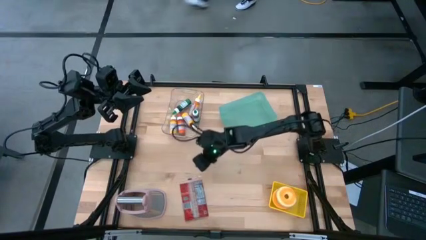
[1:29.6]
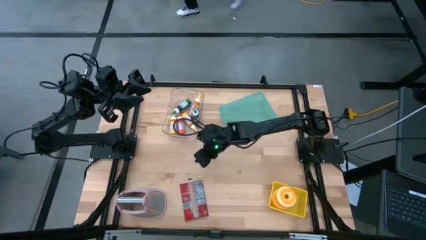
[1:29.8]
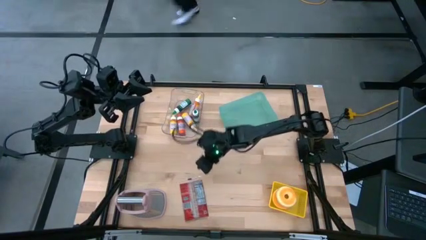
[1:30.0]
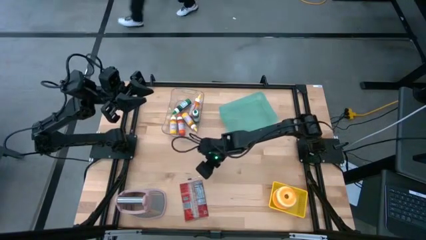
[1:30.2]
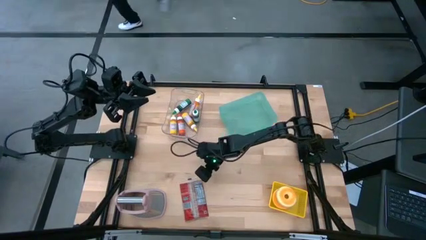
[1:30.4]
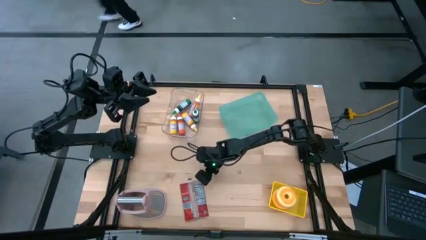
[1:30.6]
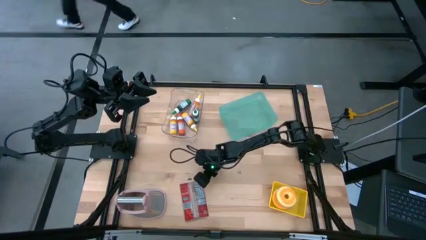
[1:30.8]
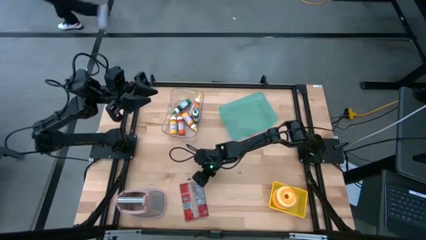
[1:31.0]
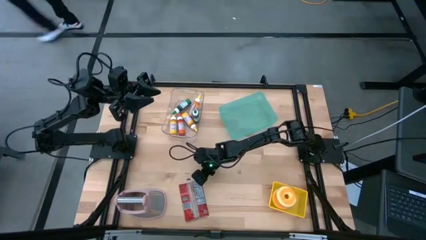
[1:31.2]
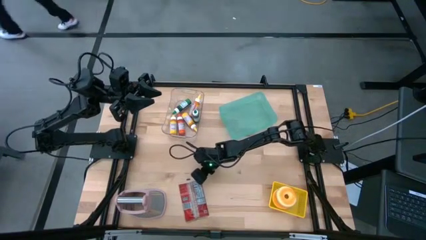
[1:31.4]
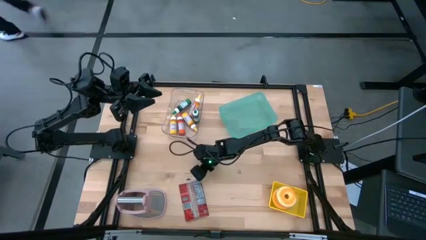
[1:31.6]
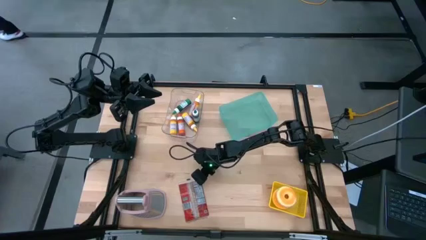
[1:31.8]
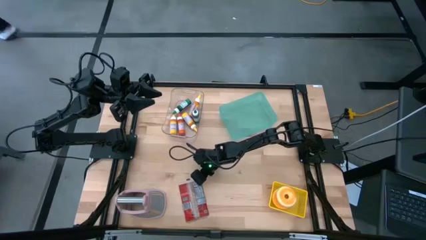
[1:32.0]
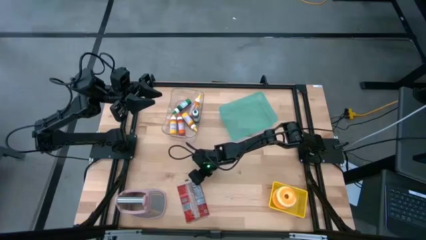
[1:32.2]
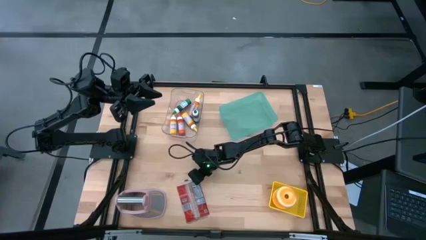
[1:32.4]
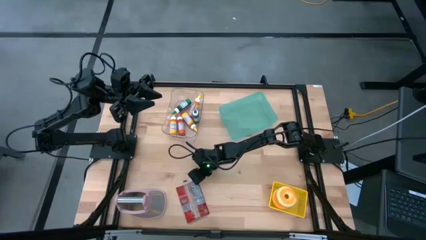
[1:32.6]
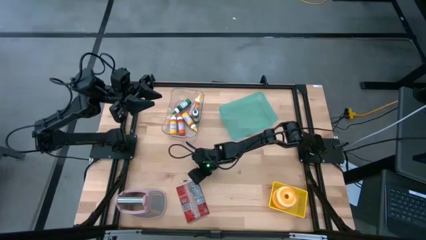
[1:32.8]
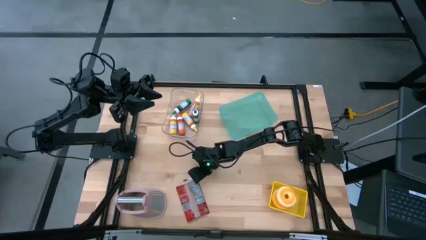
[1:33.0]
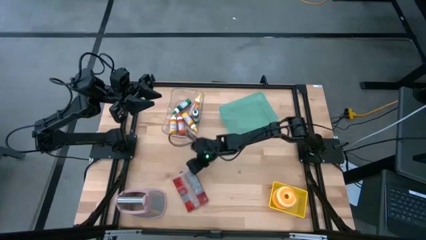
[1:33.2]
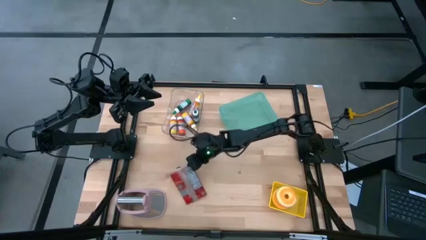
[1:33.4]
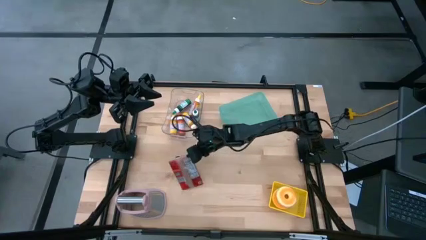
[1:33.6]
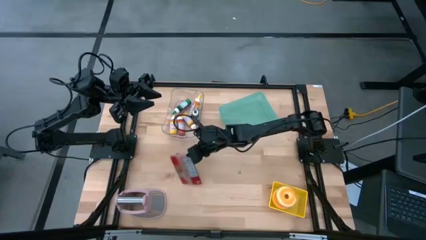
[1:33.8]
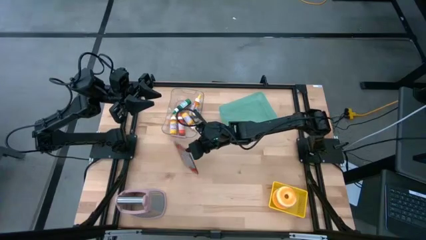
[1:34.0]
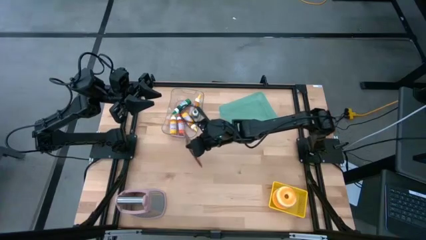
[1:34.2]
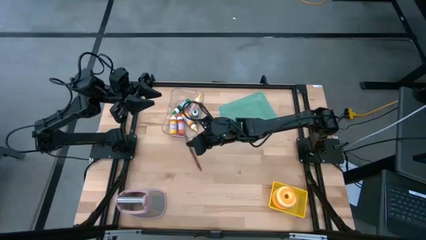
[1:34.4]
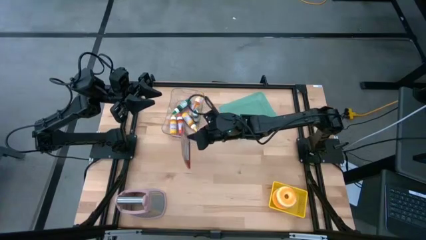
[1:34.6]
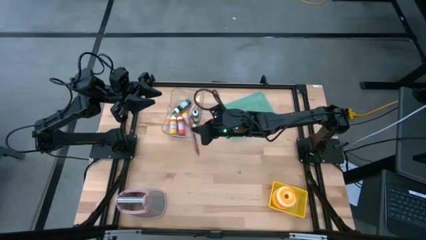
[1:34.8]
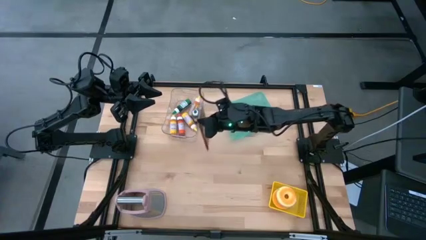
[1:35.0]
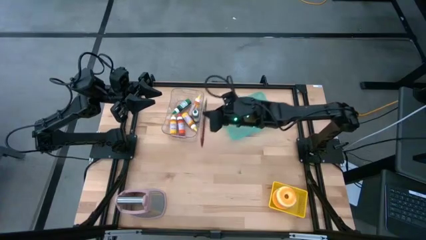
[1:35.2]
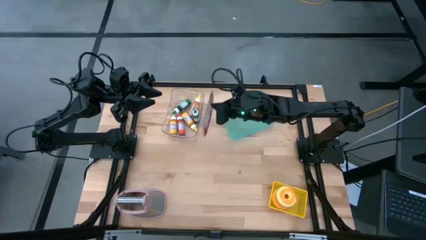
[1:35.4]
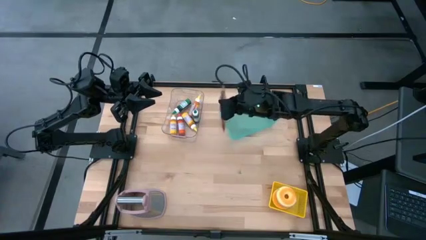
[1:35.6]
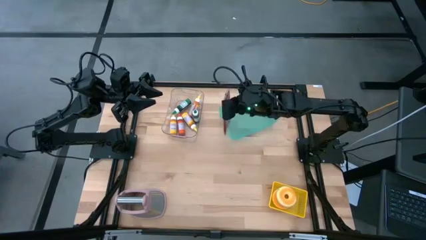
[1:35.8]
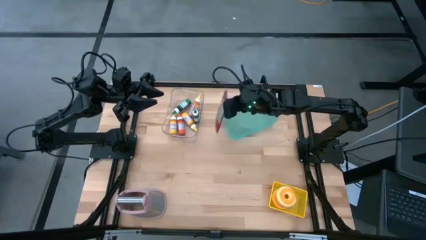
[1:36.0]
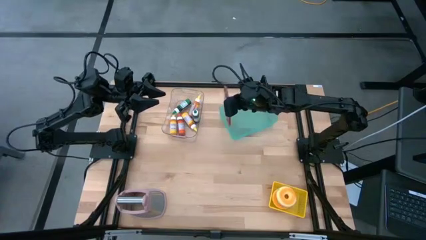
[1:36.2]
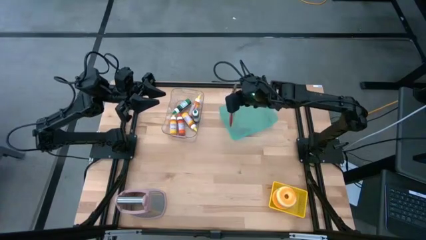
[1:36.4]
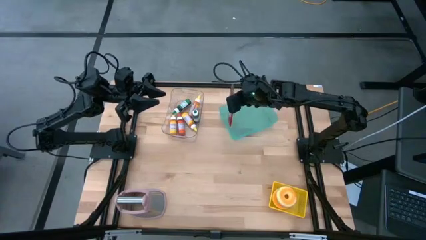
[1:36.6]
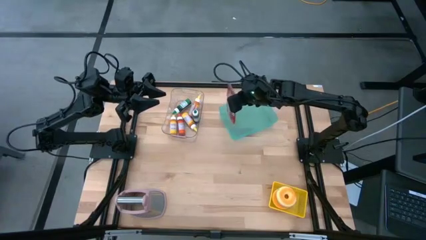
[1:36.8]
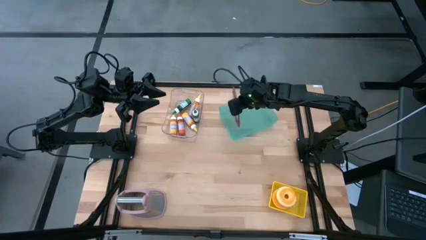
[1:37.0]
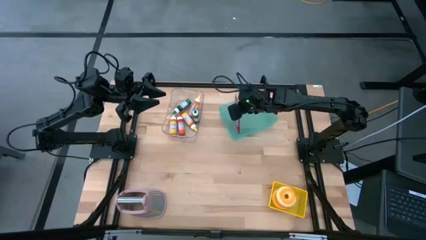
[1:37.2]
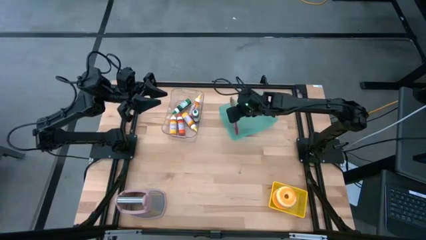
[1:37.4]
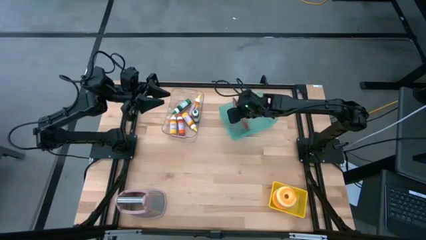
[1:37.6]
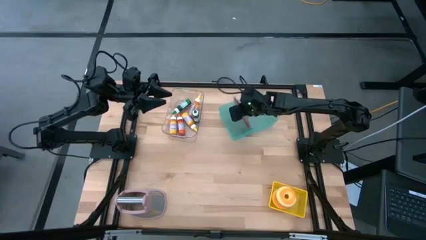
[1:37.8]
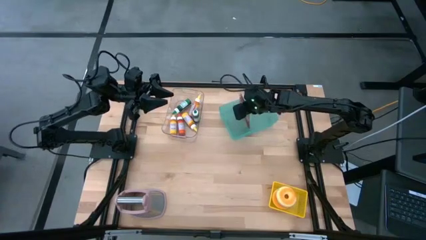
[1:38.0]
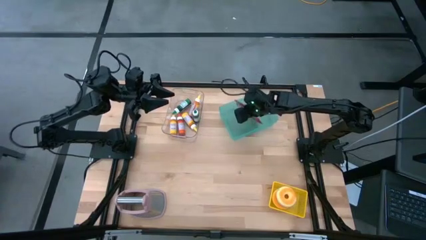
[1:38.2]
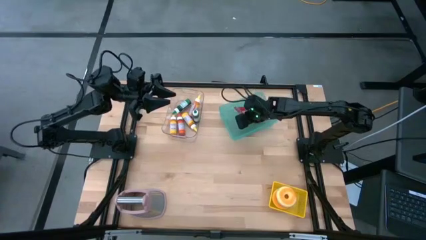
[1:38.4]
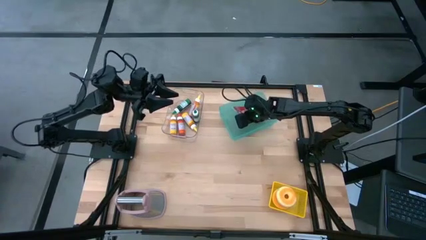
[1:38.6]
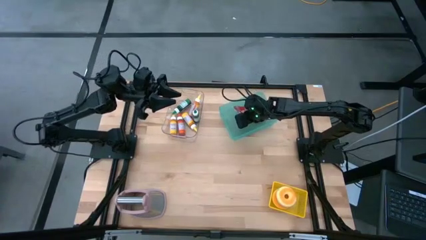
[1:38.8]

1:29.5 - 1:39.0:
Put the red popcorn bag into the blue bin

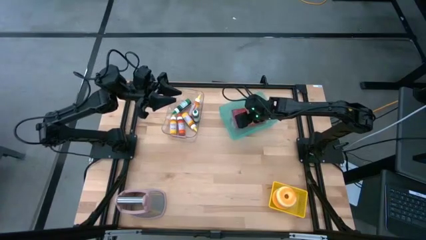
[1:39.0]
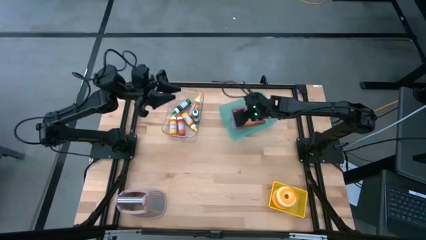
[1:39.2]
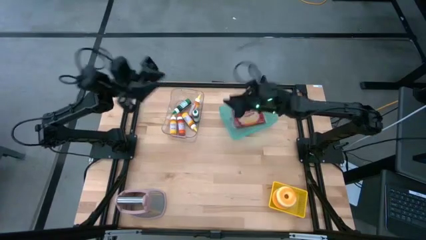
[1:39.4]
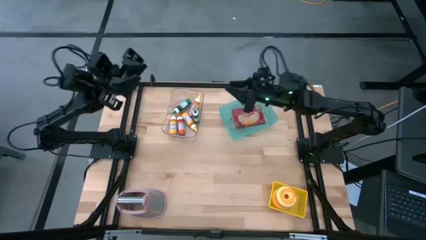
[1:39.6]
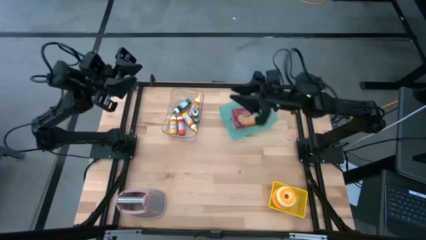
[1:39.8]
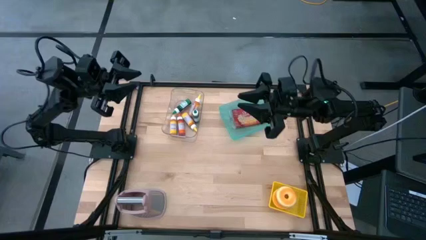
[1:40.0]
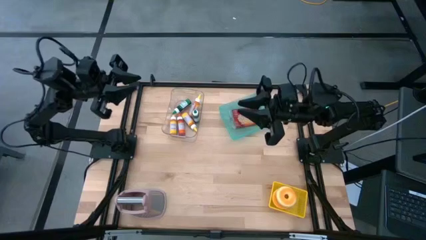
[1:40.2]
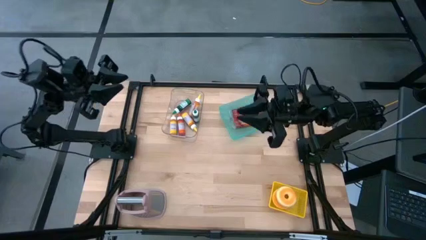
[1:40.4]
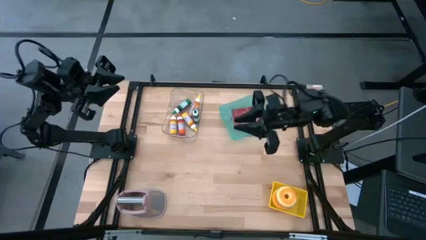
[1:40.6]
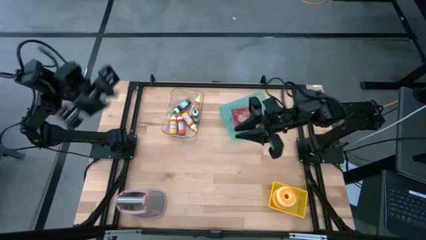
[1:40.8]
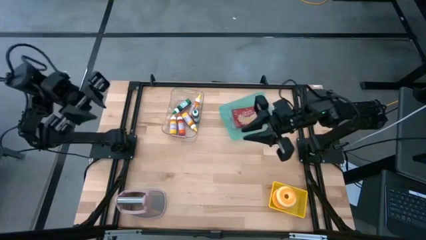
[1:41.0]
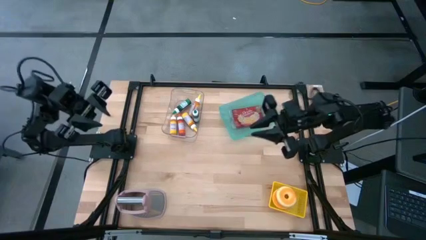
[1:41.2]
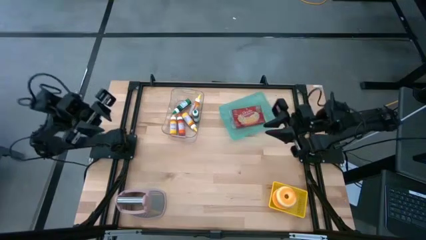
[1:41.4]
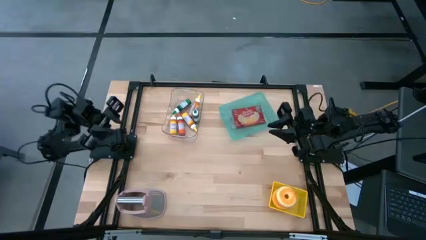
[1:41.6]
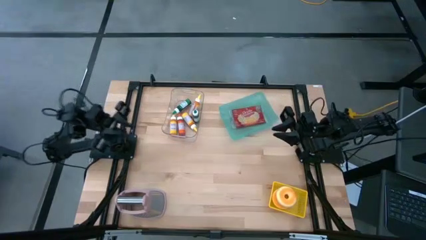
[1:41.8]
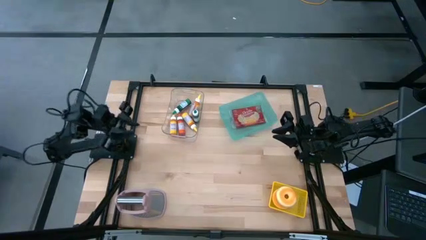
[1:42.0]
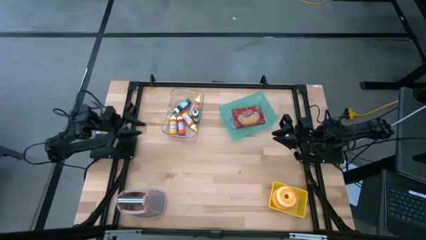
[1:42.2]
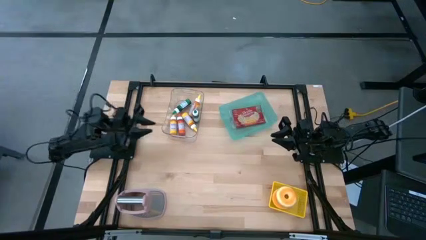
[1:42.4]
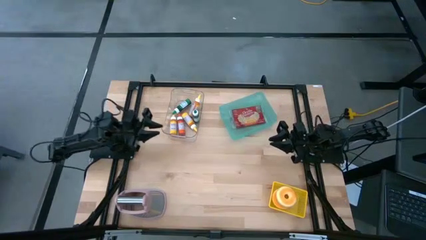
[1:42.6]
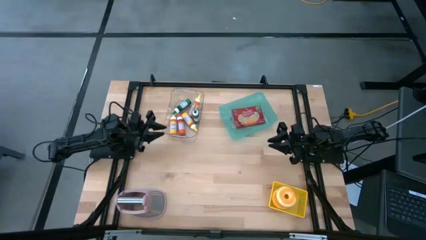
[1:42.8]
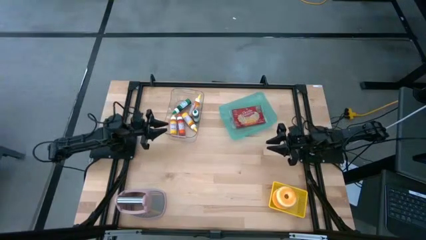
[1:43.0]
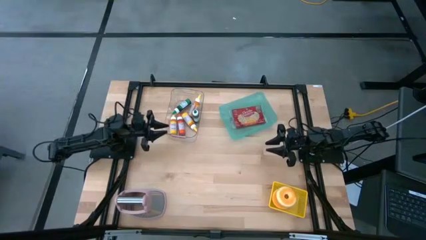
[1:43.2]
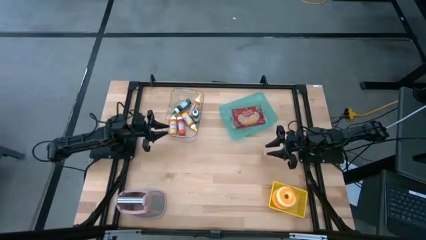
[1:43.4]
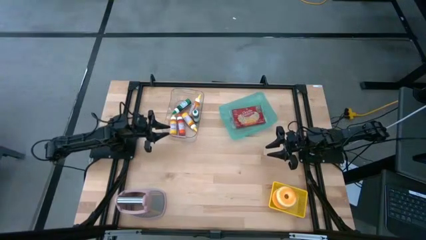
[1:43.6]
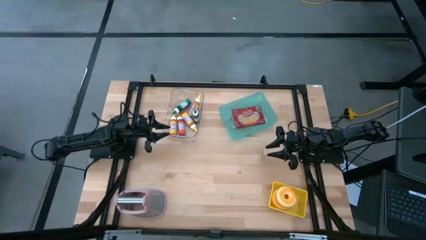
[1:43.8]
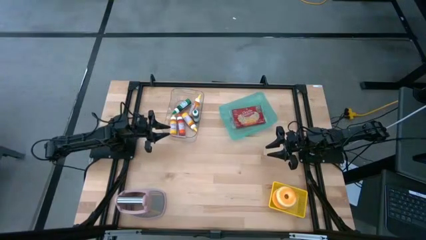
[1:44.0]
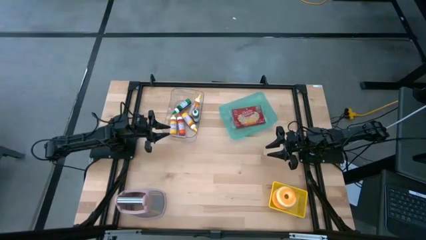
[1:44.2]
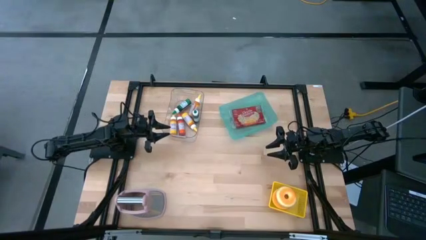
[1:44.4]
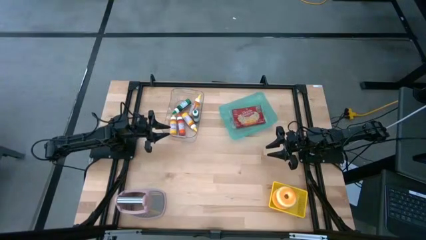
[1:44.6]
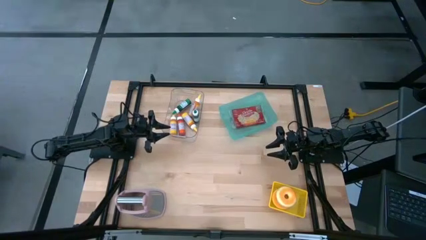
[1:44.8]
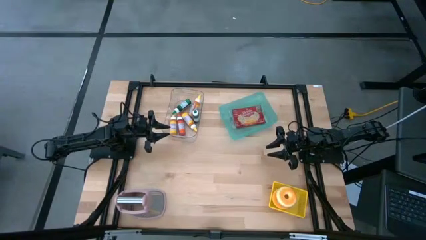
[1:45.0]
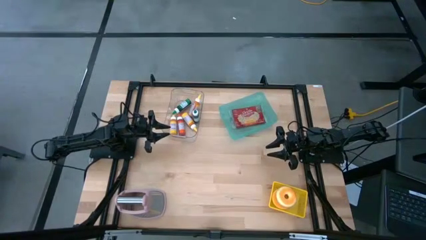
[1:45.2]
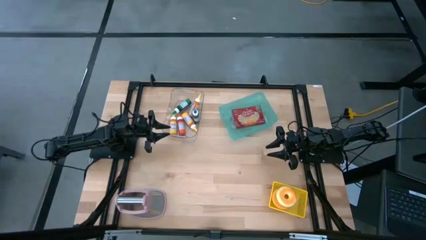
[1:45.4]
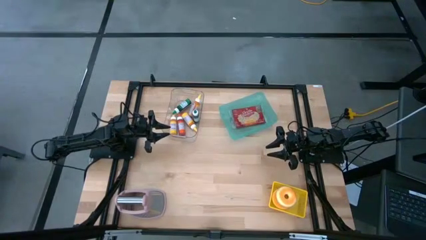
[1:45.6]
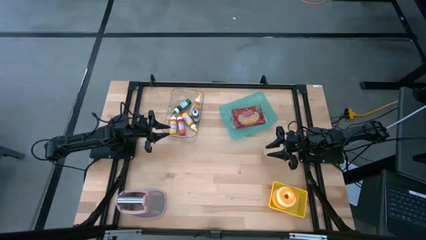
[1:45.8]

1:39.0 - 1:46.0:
Return to Home Position
